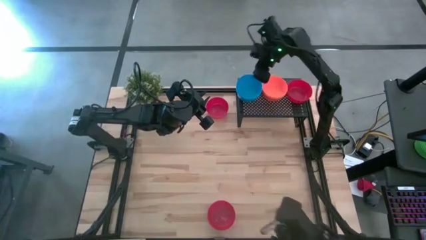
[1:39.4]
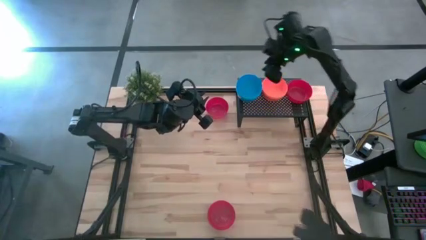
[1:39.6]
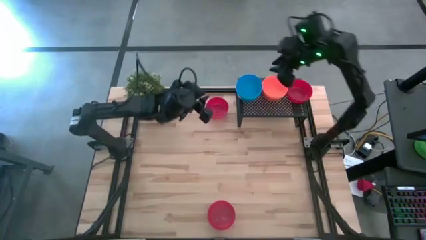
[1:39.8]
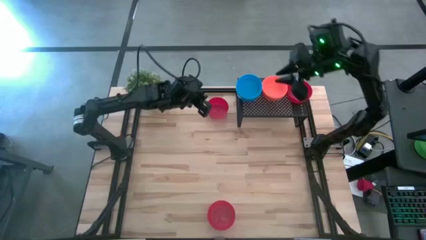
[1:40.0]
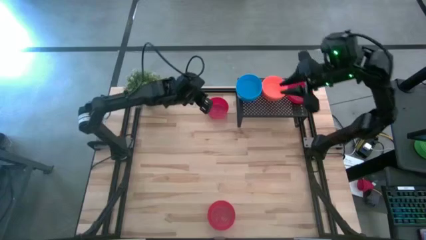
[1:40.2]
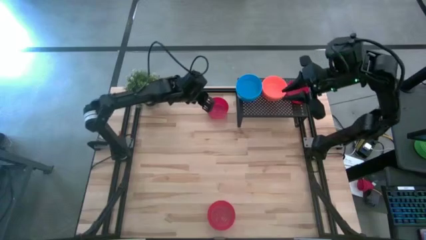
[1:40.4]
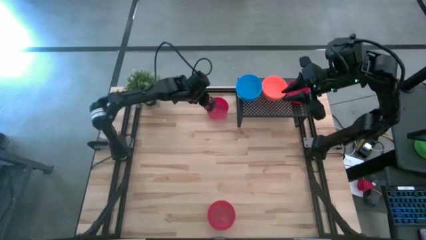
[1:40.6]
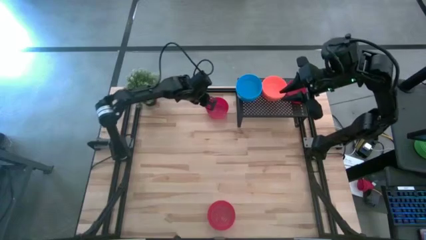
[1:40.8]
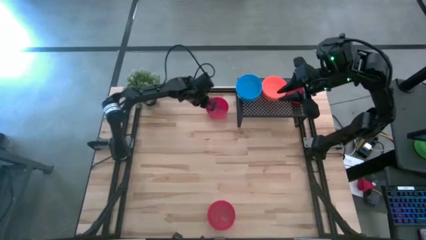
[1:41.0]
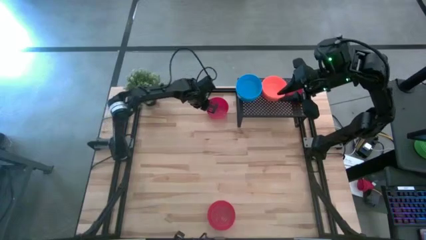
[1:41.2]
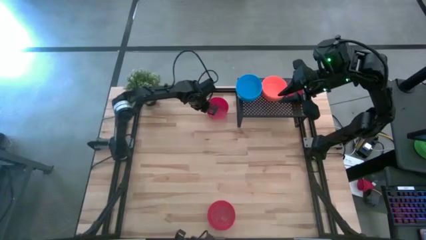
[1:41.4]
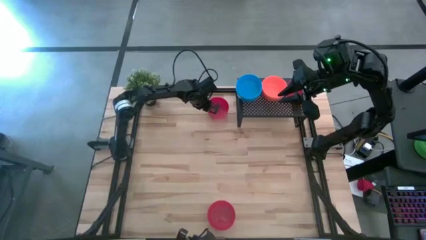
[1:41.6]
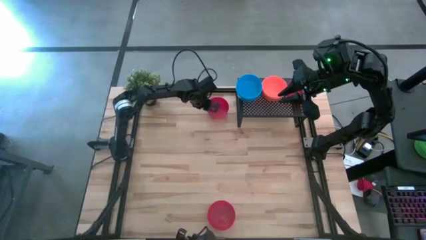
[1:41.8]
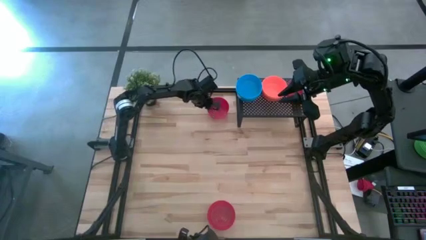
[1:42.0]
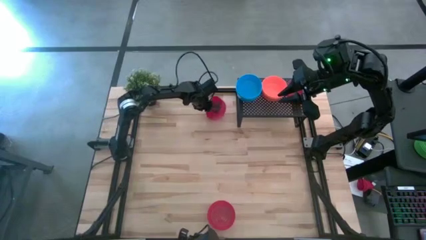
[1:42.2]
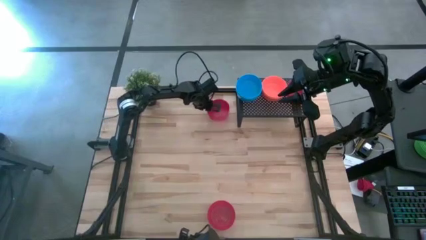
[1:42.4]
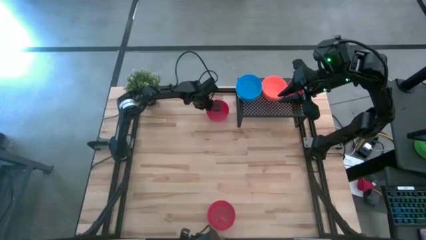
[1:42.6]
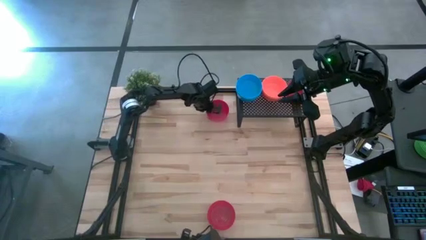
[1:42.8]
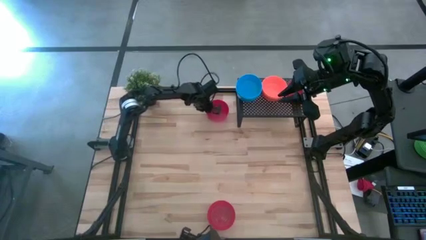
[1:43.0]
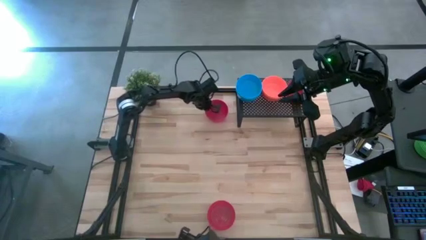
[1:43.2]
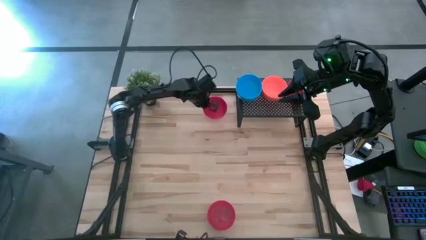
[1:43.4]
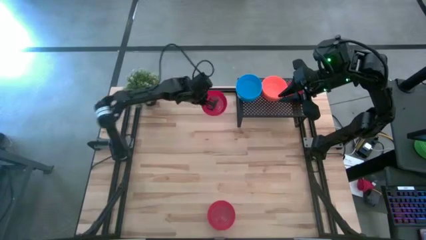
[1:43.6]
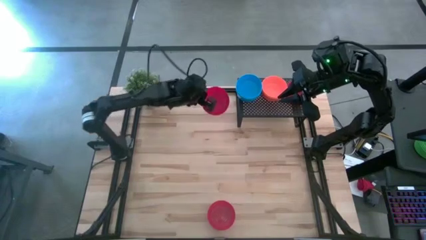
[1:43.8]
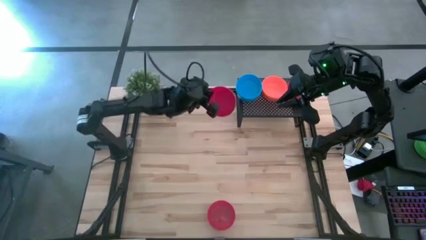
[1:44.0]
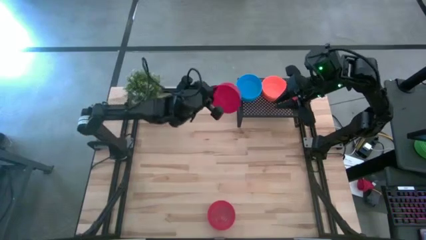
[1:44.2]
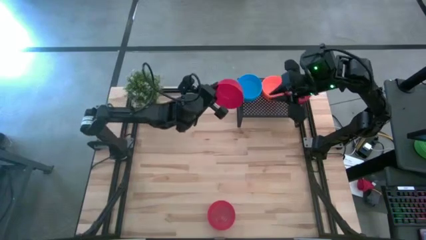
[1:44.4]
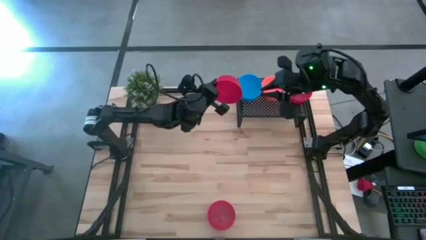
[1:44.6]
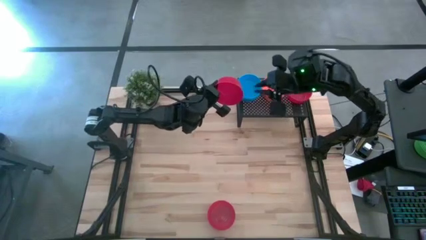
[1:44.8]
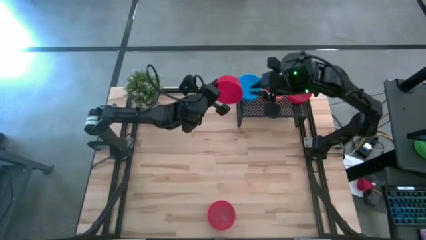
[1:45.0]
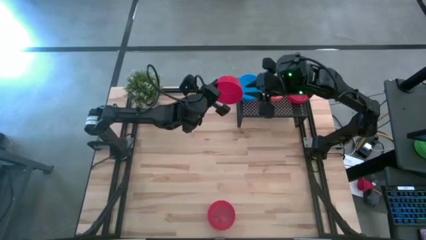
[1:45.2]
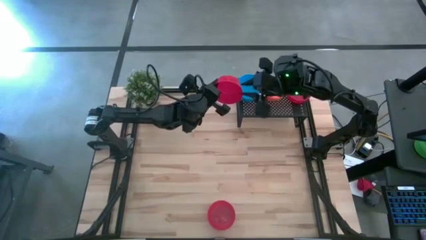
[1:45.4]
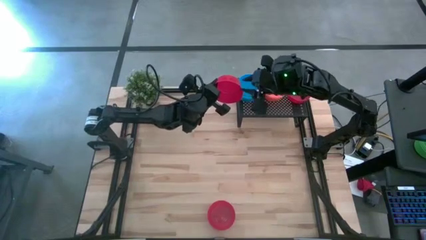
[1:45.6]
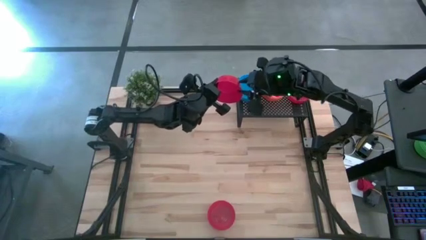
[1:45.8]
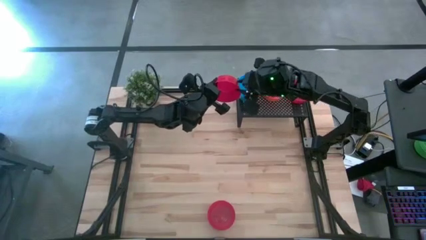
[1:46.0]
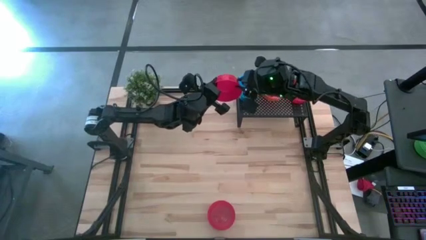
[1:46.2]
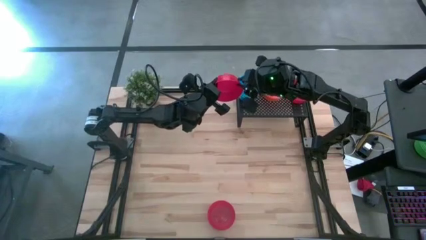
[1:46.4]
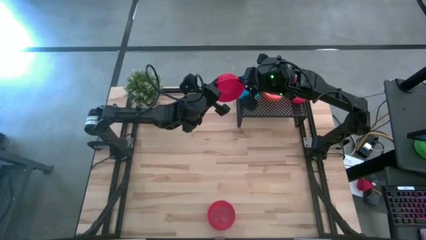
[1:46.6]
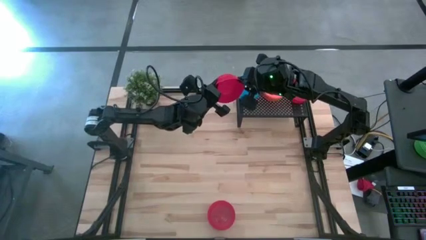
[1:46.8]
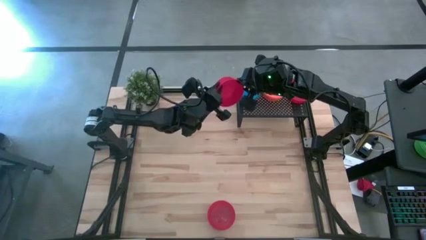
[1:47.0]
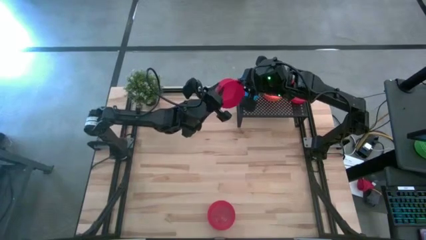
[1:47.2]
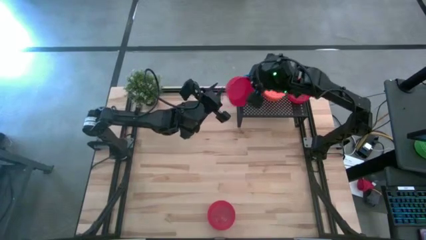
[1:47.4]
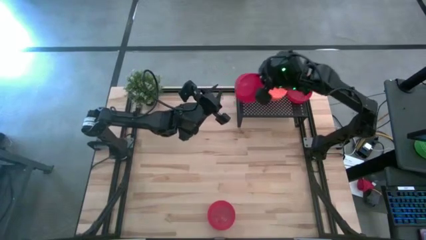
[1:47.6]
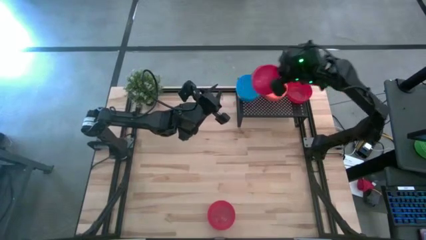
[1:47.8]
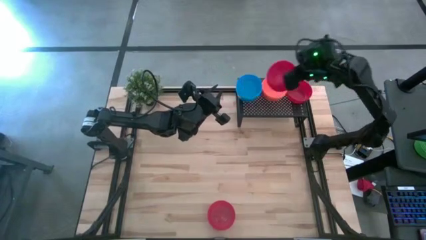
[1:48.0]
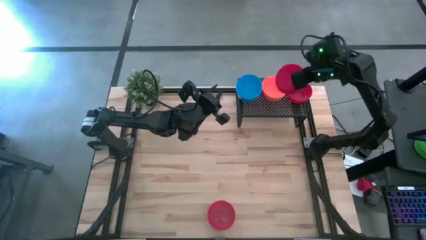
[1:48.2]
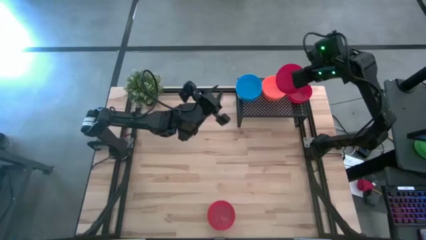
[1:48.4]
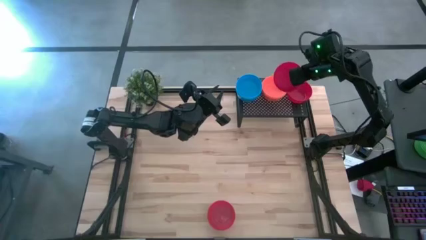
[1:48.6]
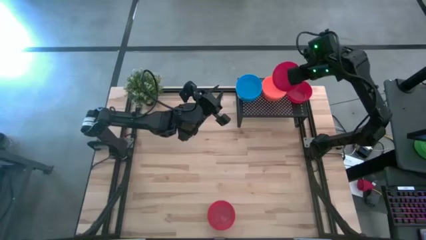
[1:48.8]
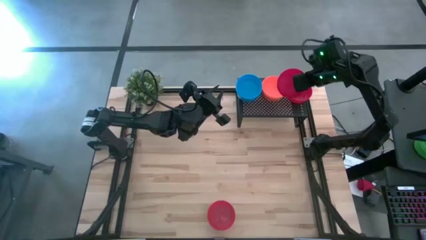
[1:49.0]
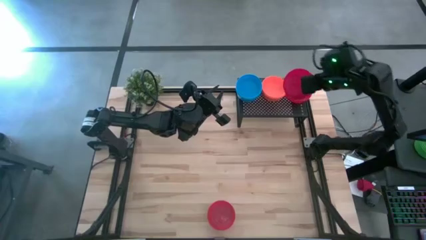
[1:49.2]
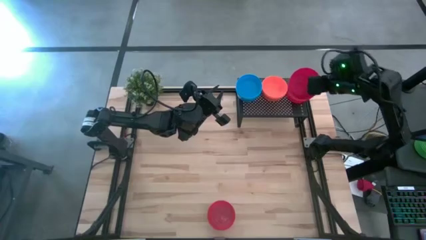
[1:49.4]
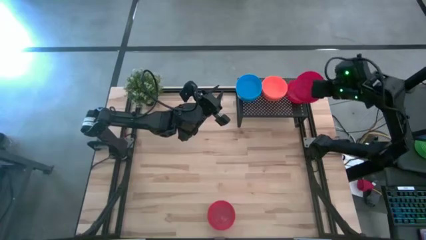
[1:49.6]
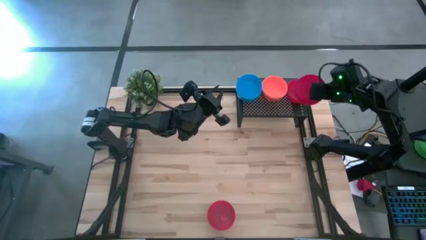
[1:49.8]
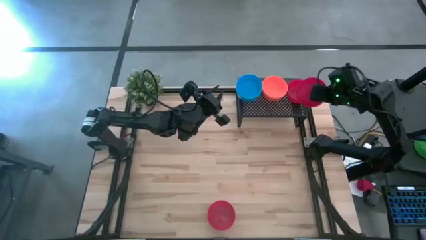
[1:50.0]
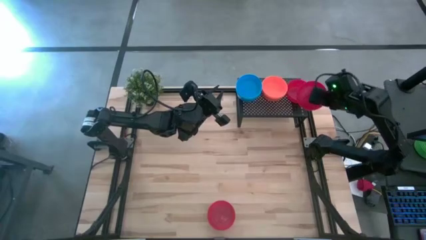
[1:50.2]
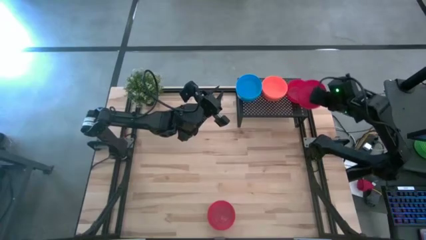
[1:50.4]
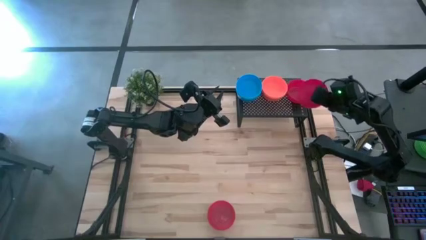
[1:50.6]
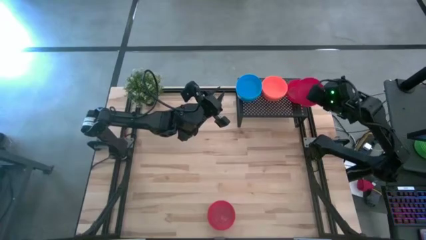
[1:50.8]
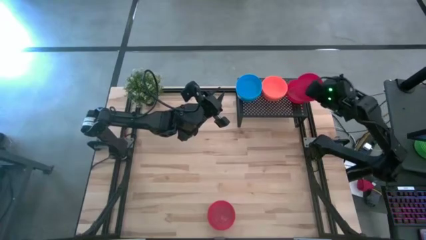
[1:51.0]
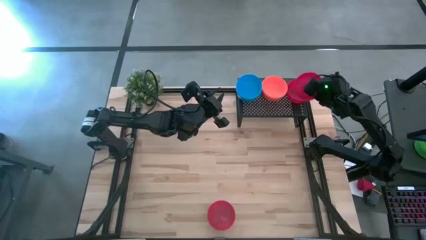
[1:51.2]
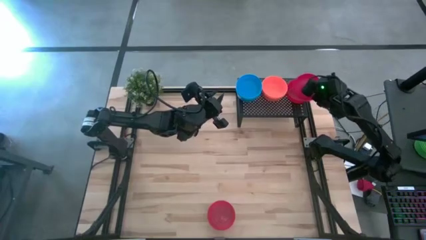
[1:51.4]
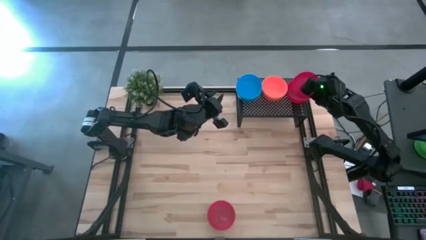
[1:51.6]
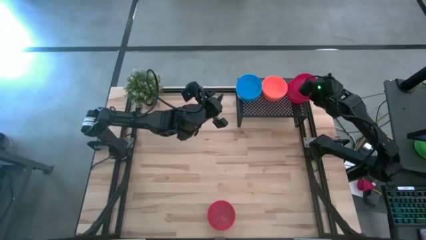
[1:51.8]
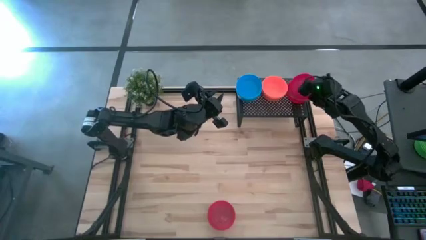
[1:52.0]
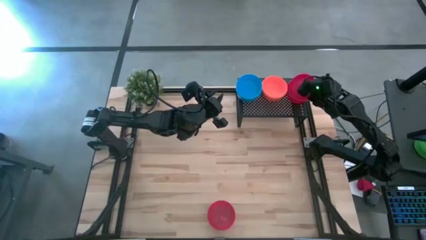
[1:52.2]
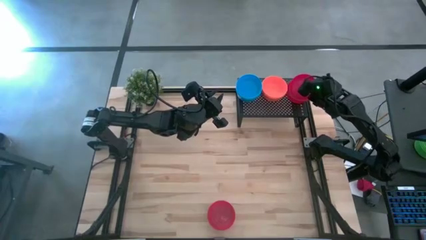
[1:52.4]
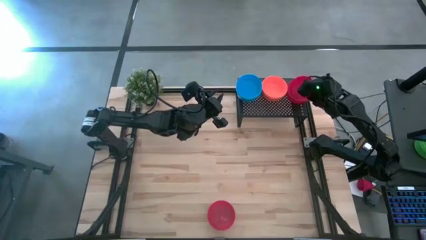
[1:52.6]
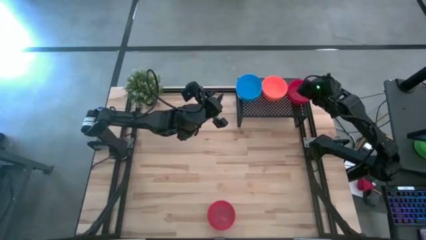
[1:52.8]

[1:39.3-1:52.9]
Task: Pick & Place Mini bowls
Stack the top red bowl on the red bowl

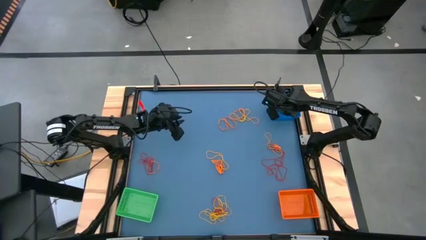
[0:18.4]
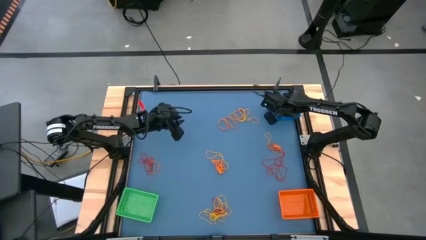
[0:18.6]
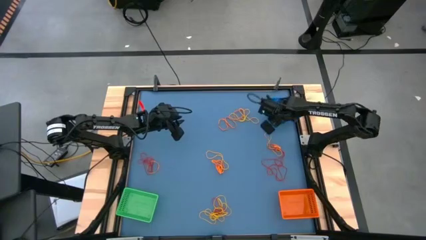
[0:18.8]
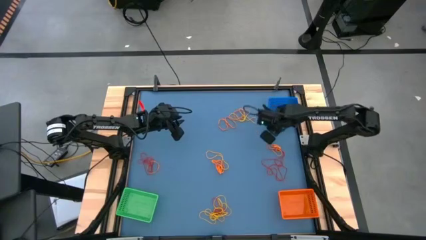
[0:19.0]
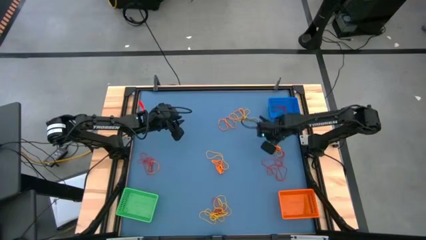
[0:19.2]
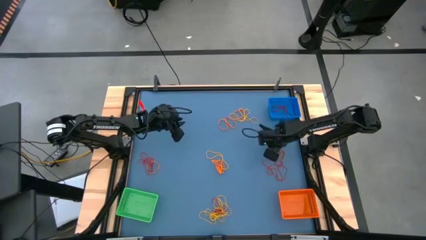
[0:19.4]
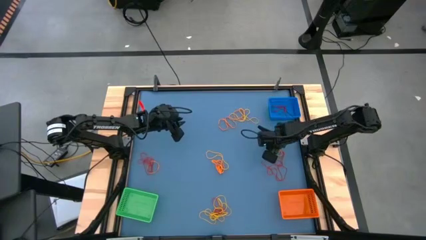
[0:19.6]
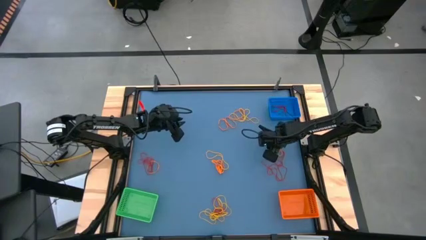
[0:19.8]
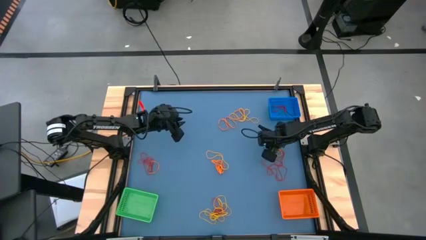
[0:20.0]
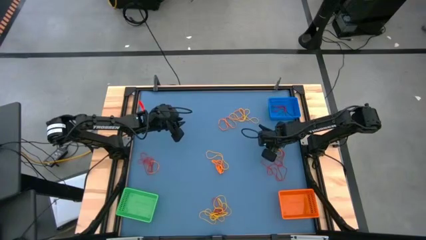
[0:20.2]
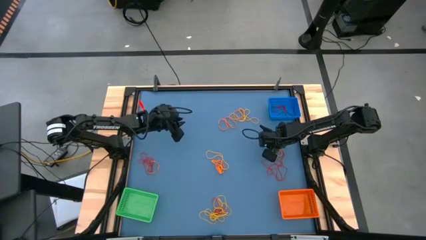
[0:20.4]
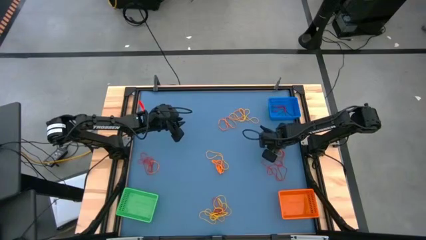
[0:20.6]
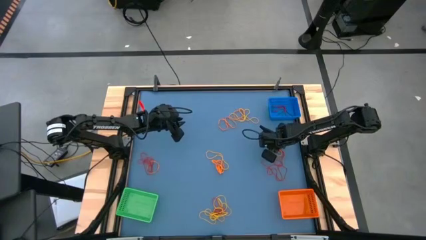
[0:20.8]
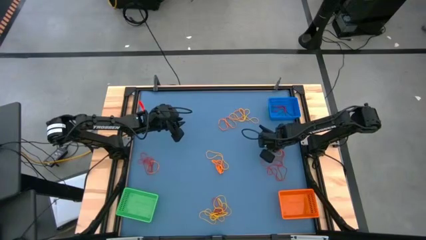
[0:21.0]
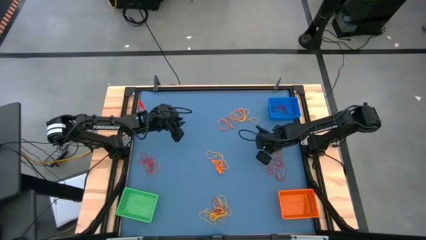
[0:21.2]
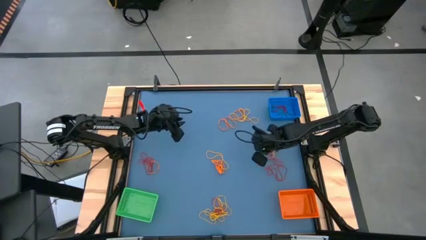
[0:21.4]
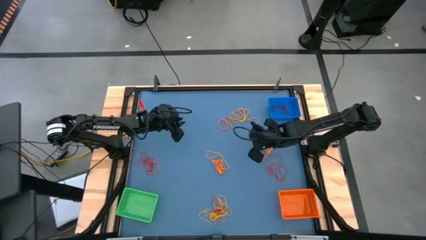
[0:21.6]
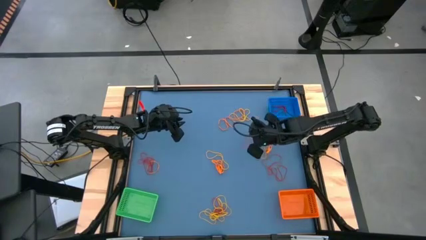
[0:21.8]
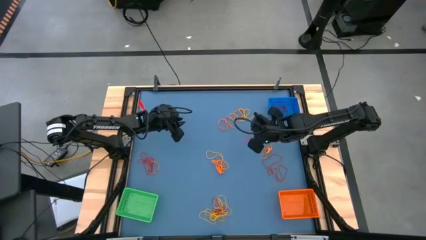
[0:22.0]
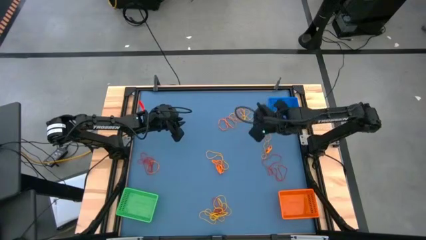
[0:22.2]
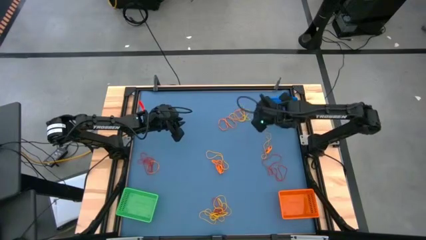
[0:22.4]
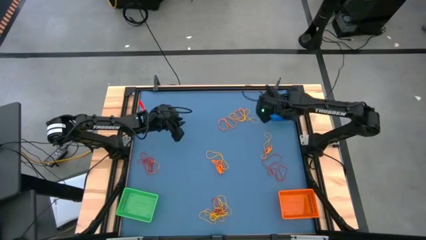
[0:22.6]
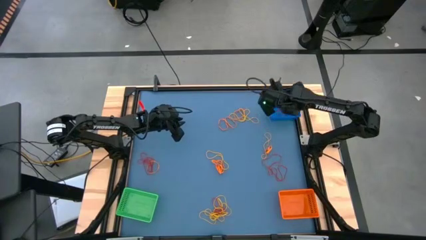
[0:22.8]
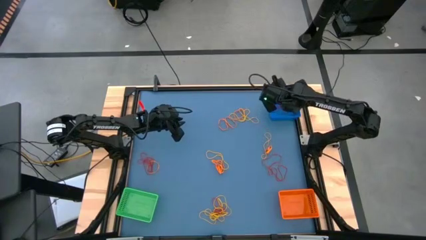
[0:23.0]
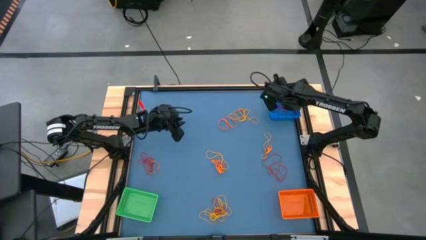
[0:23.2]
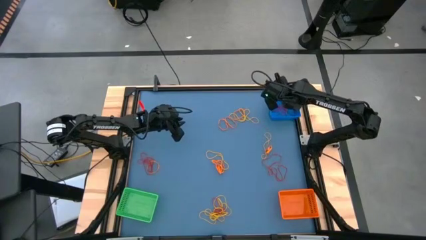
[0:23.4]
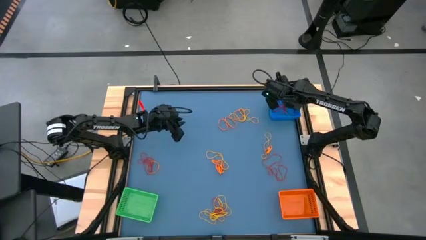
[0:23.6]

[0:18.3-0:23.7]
Task: Sort rubber bands into baskets
Put the red rubber band into the blue bin
